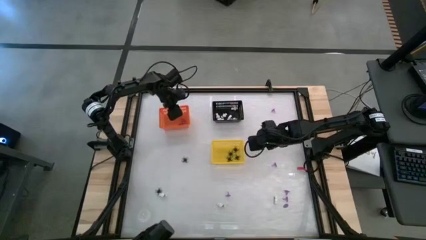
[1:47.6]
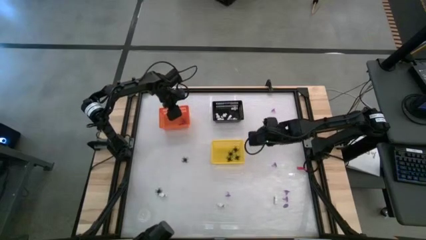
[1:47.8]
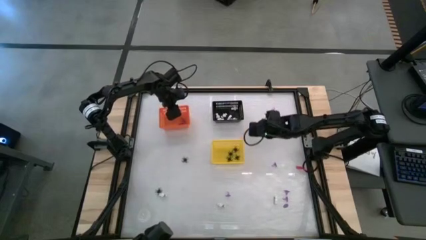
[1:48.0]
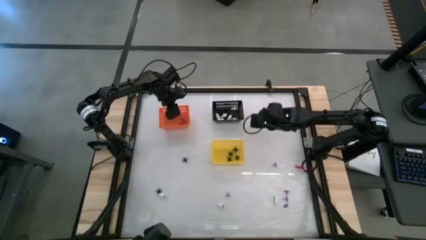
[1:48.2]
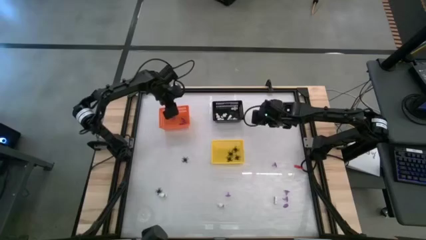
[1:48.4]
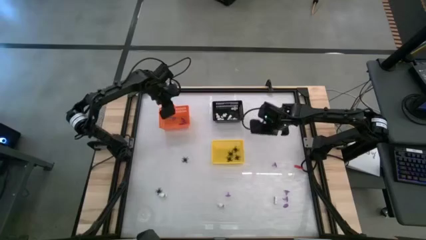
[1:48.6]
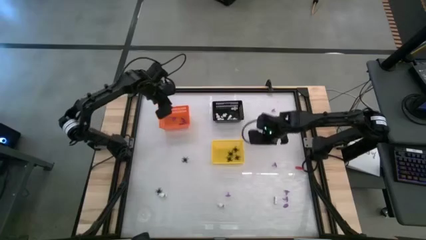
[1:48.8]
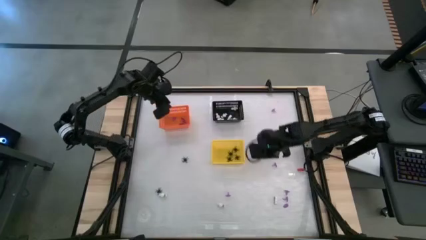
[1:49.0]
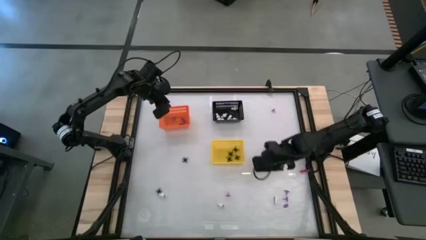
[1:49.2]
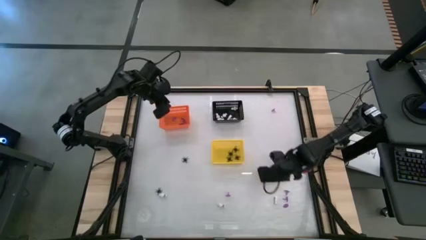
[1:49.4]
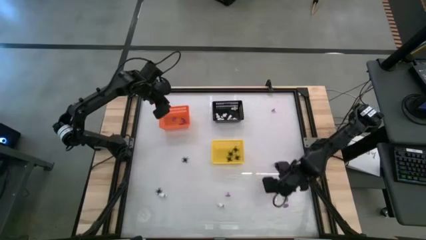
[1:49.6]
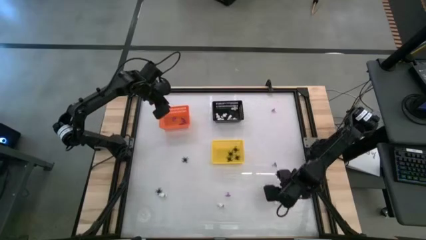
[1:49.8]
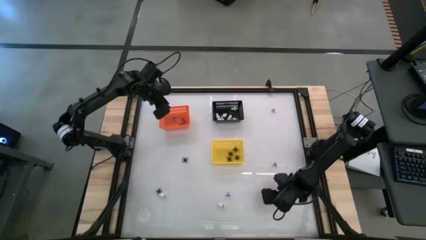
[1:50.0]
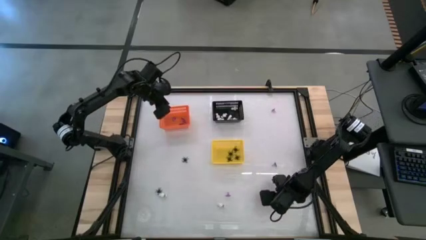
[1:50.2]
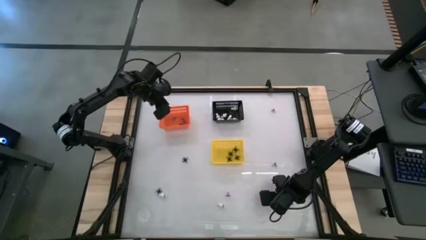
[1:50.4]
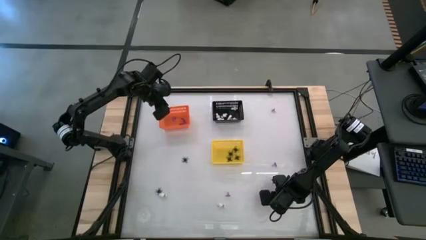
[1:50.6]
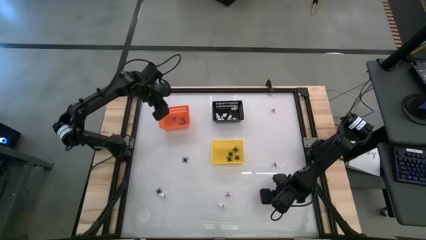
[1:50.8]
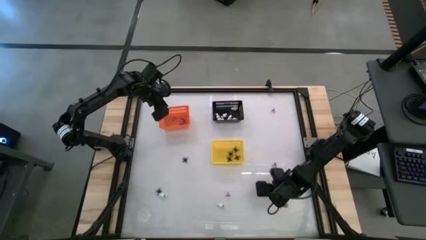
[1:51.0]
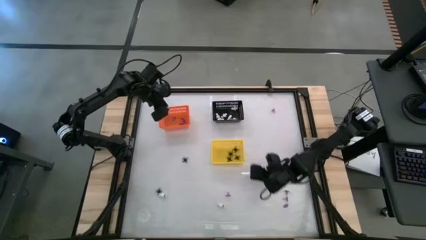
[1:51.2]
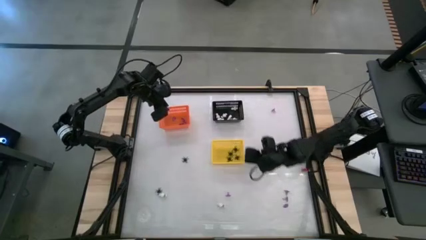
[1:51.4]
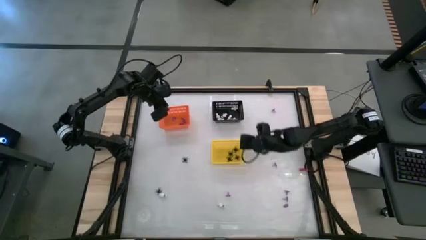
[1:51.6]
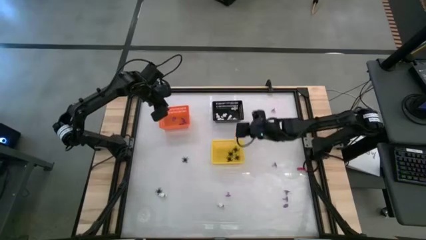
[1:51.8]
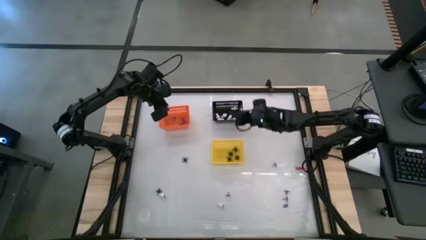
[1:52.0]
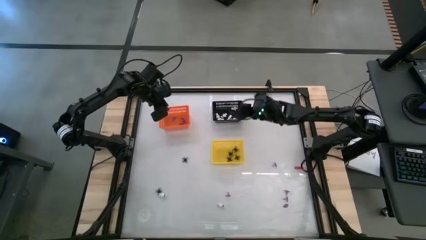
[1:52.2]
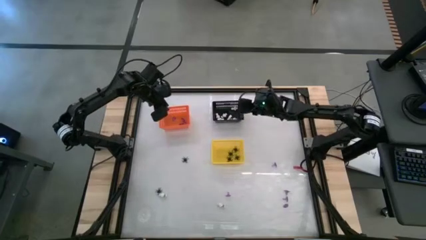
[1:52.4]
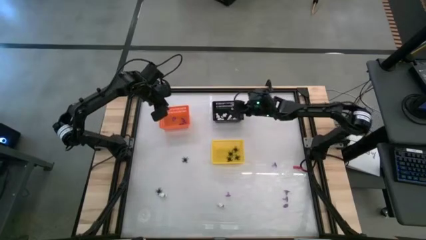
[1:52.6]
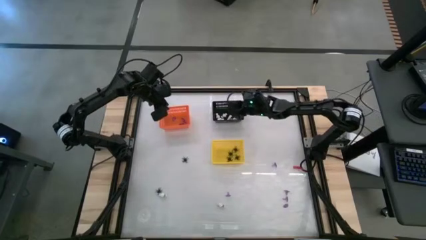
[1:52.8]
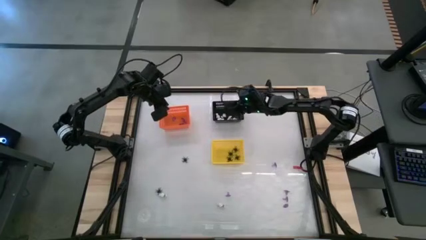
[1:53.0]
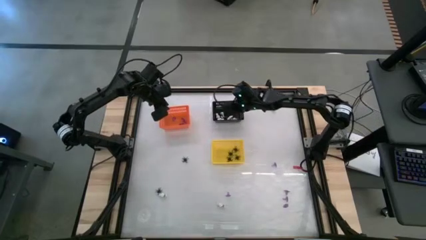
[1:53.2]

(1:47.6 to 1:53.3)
Task: Sort Halloween decoration
Put the white skeleton toy into the black bin

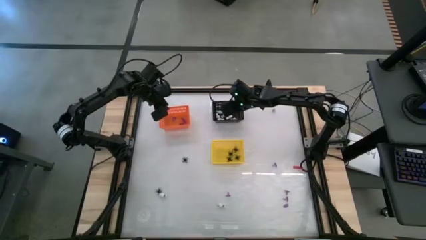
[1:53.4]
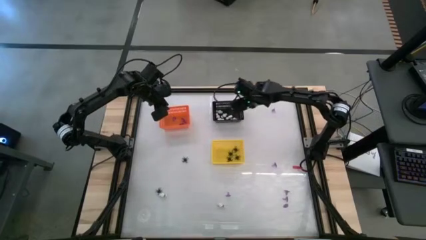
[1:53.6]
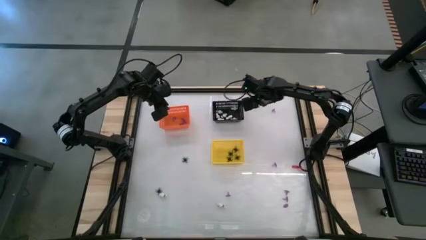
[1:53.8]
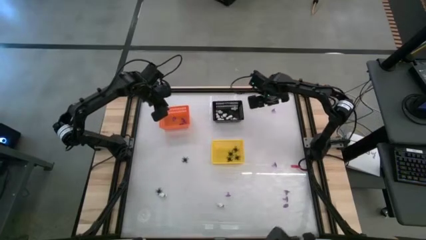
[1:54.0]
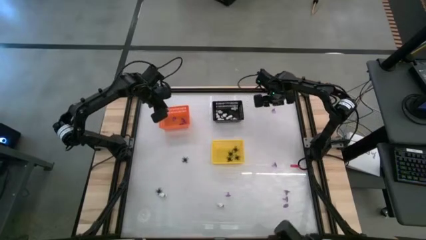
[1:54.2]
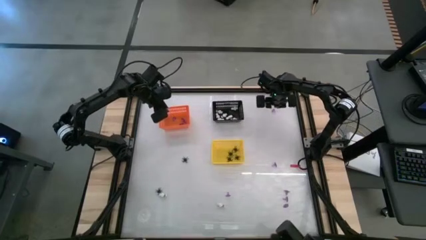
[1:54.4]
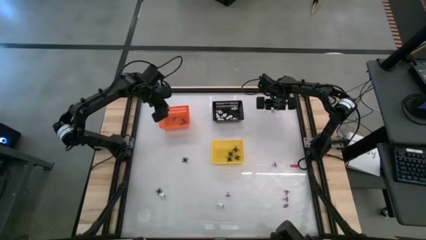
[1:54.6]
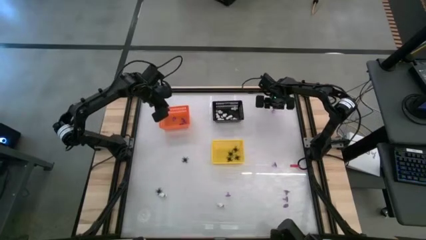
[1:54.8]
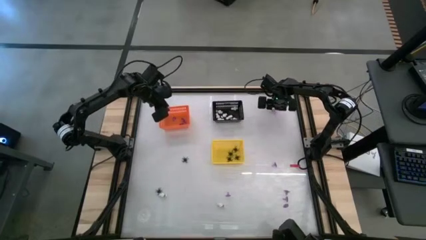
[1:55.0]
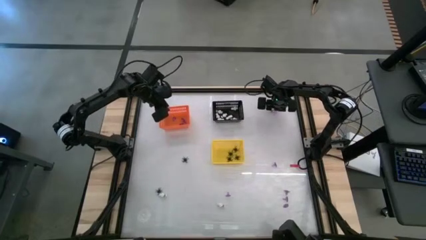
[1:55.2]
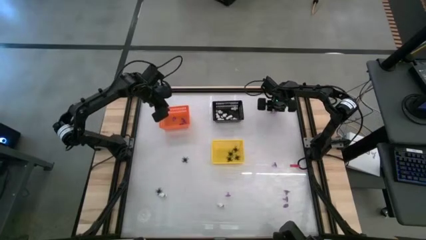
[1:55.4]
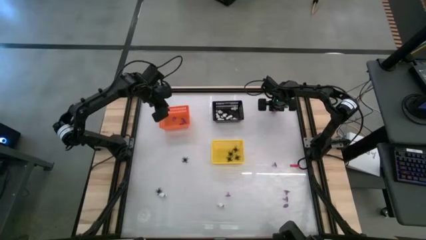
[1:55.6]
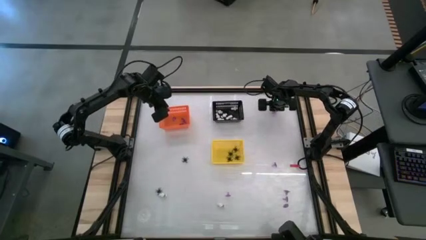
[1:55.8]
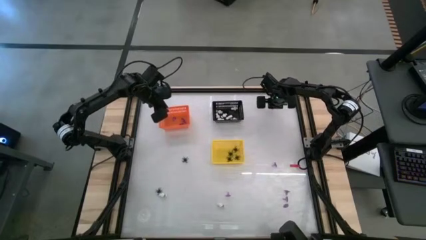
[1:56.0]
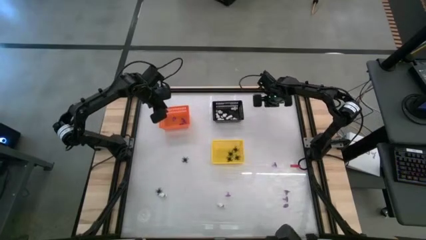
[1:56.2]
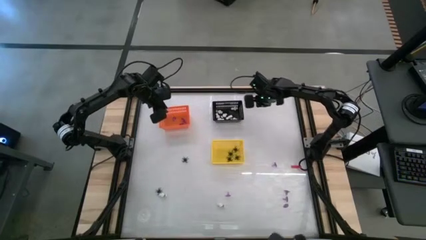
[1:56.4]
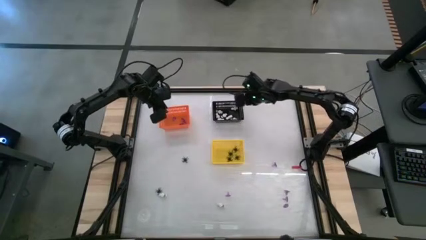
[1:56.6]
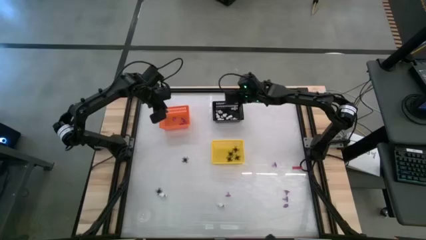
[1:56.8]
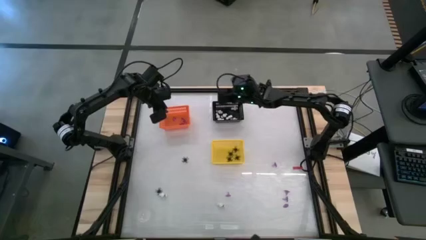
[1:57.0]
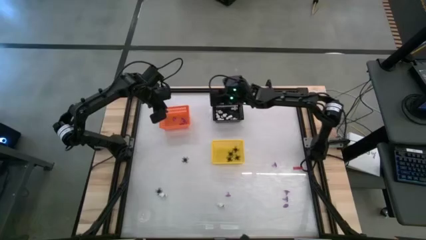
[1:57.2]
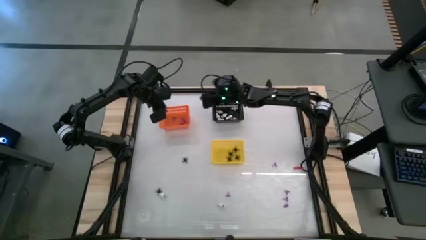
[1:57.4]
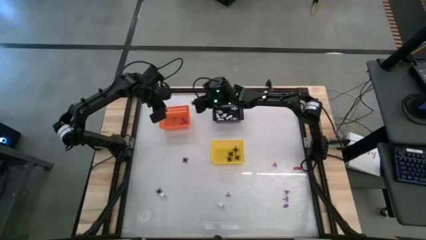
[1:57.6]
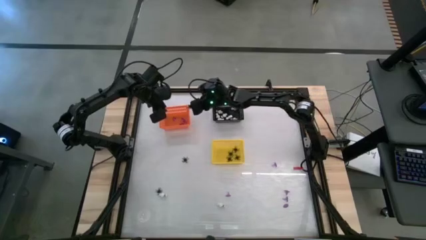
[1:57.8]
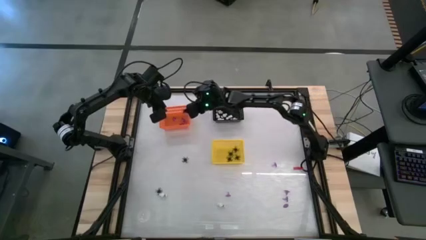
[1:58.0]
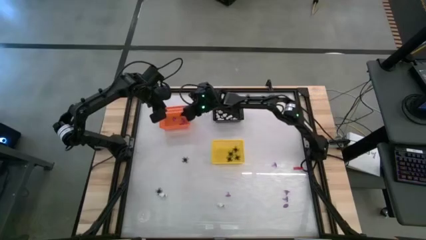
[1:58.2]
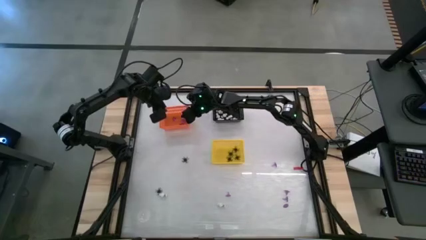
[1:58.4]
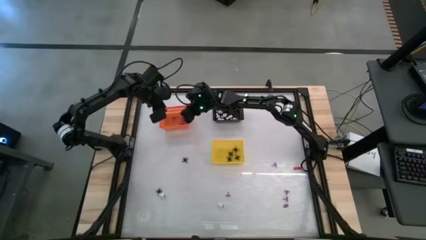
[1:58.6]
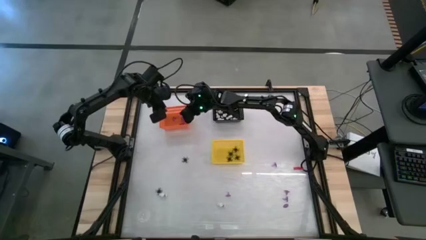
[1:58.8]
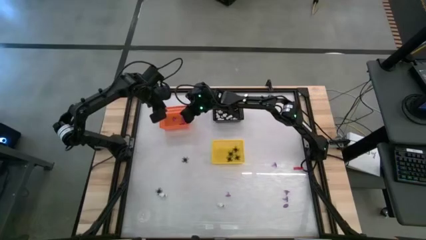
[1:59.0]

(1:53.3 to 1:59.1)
Put the violet witch hat toy into the orange bin

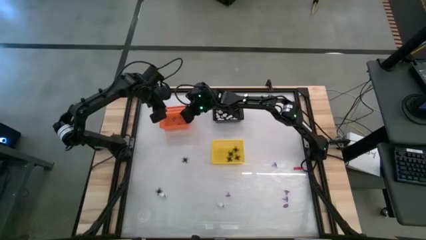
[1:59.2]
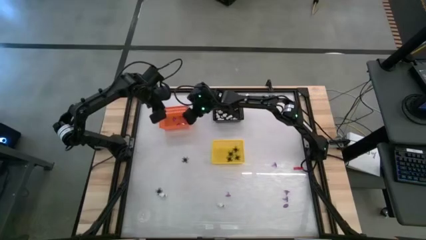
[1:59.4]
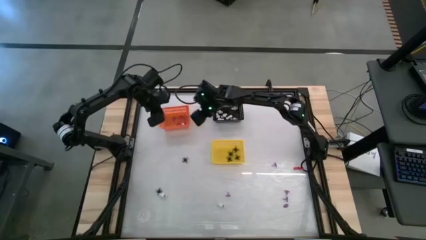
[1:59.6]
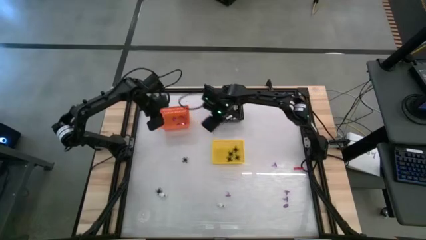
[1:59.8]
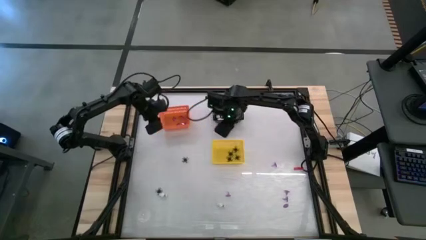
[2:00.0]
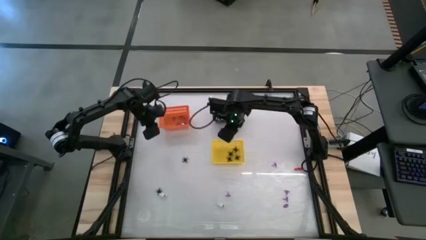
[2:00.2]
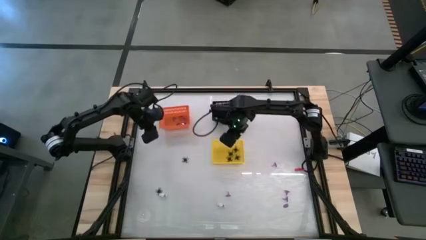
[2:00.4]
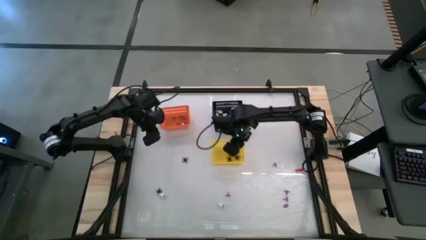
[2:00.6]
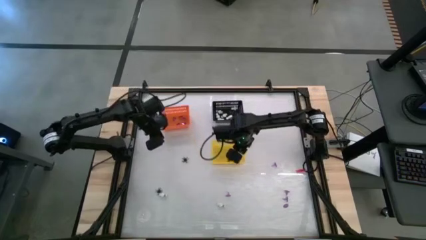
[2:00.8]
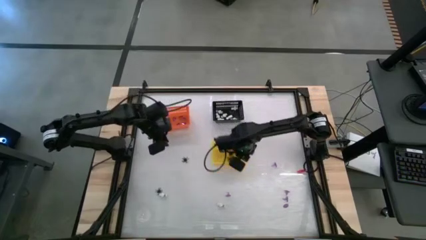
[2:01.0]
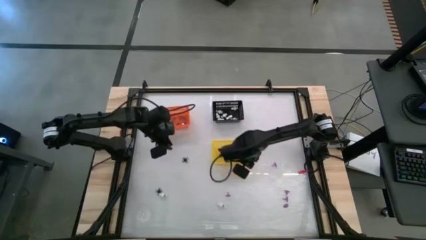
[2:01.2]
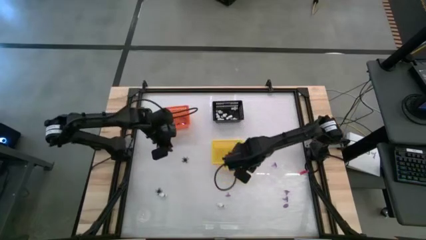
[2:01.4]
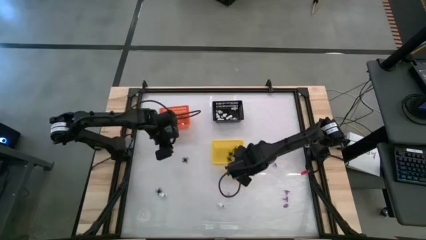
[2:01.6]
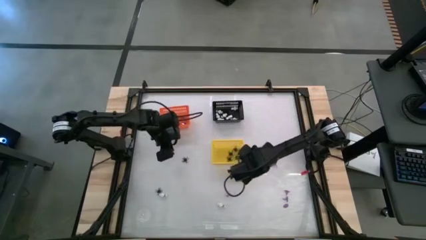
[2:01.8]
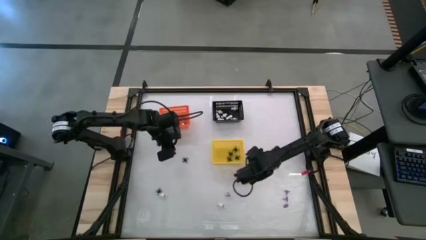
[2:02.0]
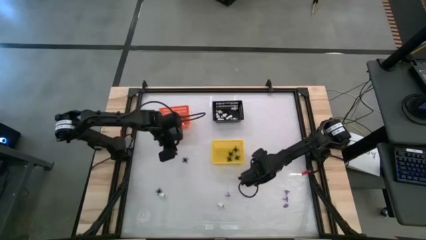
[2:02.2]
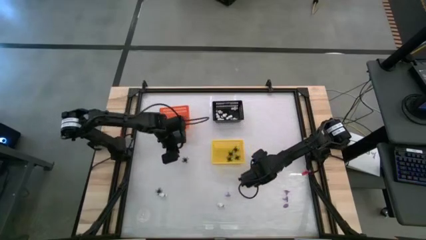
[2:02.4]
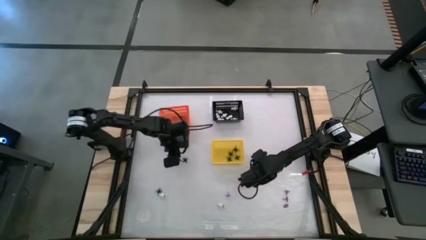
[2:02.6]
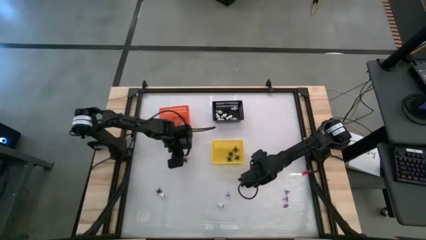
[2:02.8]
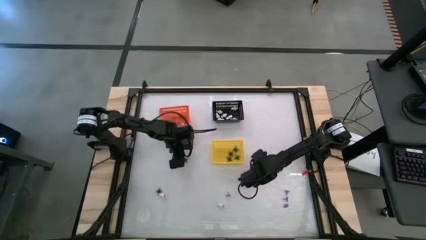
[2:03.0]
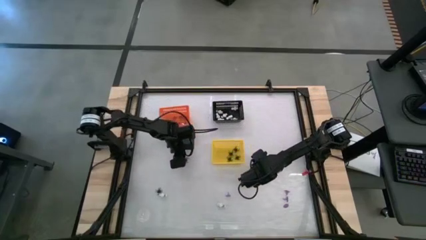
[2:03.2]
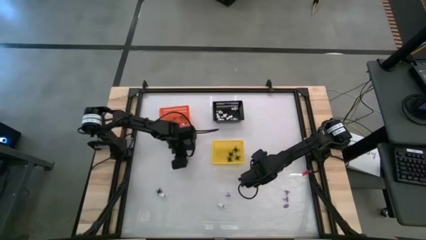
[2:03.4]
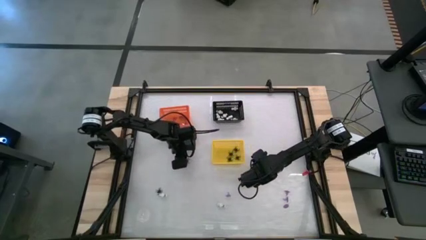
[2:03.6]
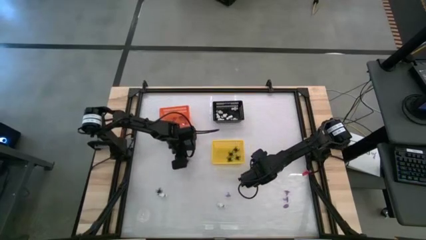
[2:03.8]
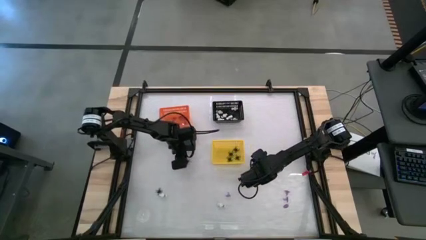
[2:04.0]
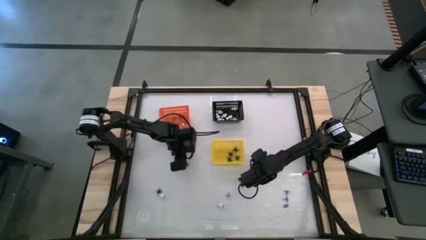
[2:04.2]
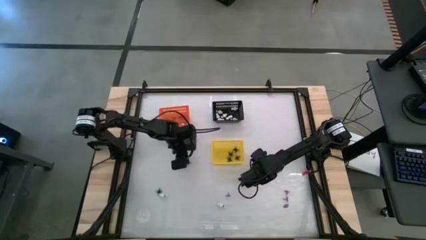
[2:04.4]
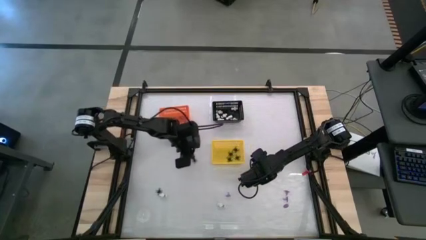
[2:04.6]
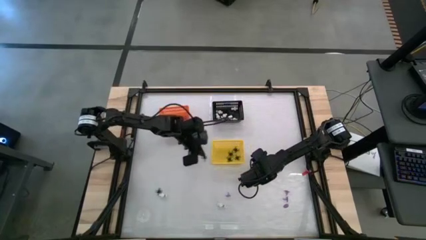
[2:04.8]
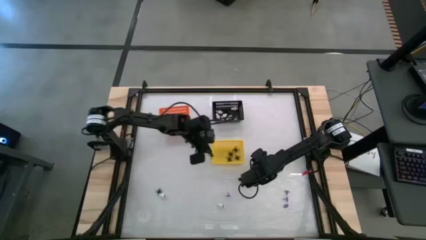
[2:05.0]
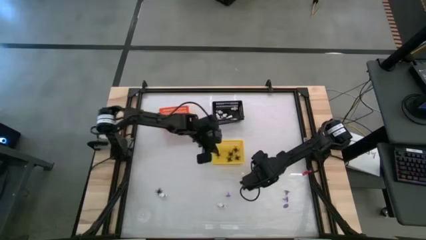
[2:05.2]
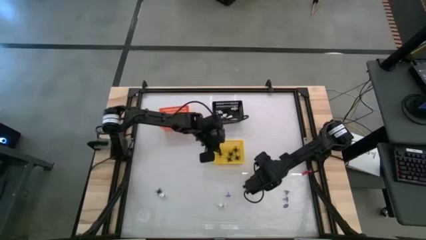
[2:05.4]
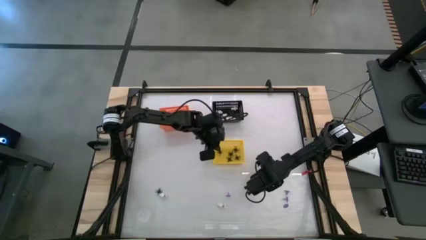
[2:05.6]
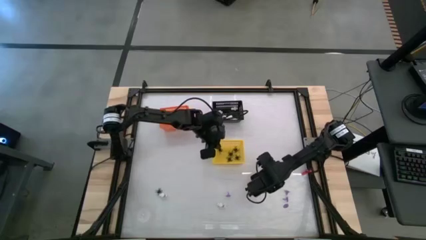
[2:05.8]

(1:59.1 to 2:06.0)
Put the black spider toy into the yellow bin
